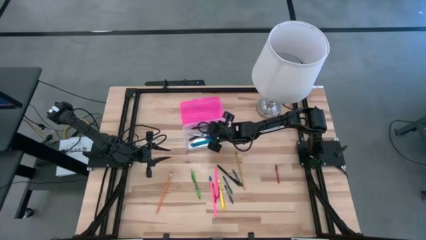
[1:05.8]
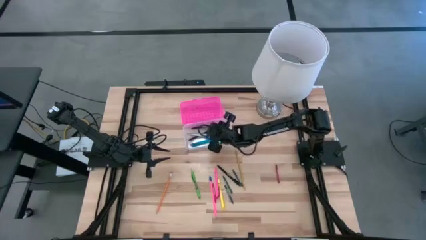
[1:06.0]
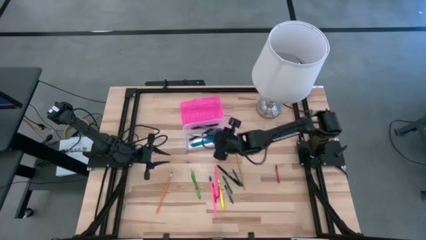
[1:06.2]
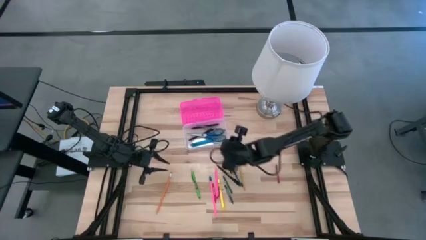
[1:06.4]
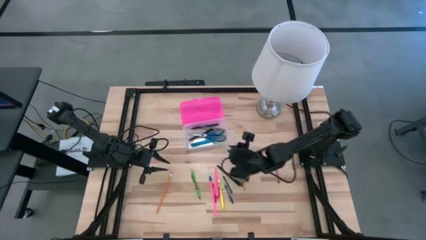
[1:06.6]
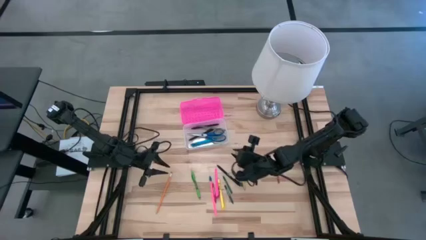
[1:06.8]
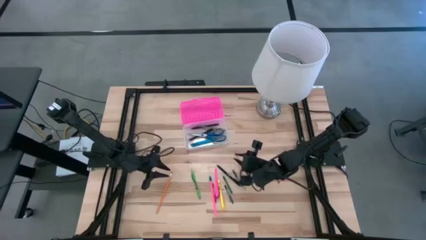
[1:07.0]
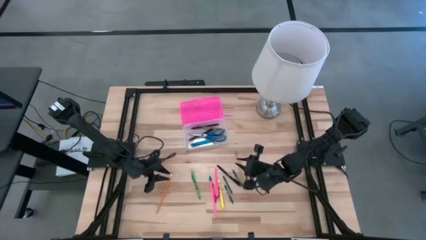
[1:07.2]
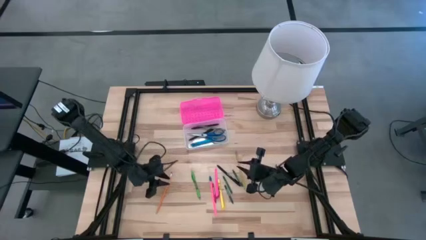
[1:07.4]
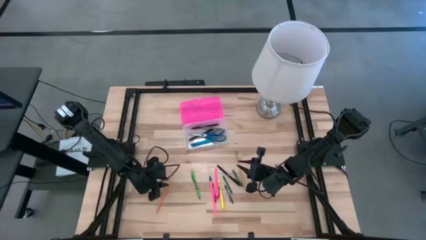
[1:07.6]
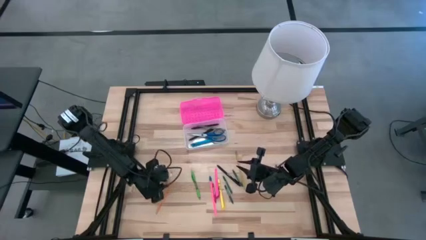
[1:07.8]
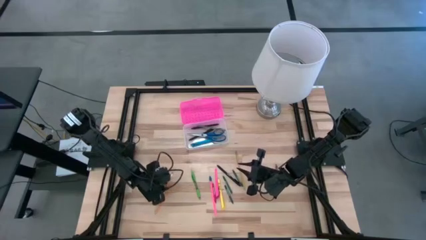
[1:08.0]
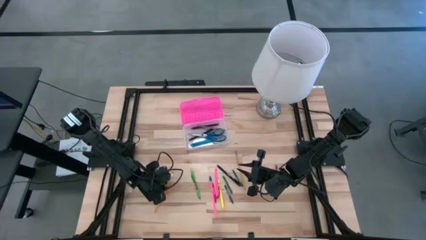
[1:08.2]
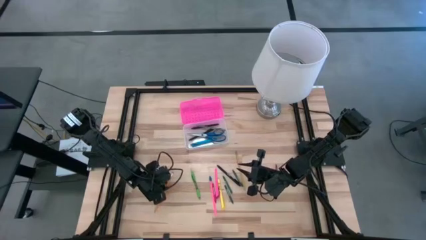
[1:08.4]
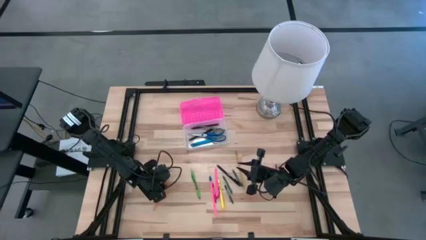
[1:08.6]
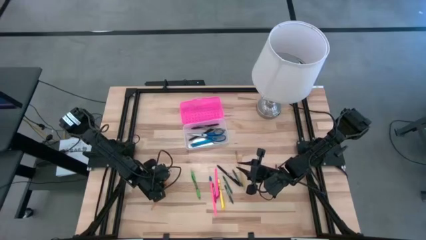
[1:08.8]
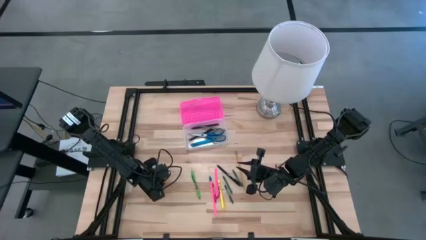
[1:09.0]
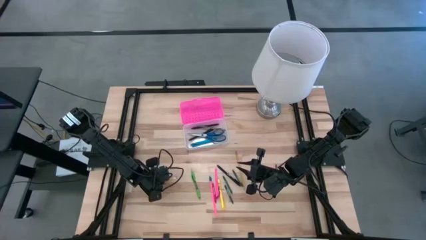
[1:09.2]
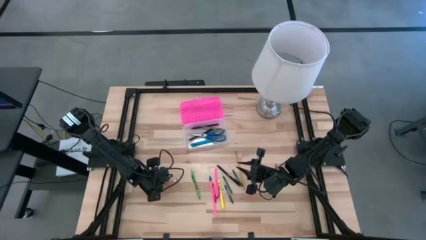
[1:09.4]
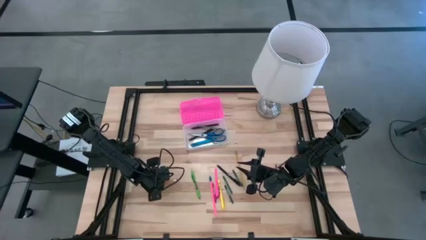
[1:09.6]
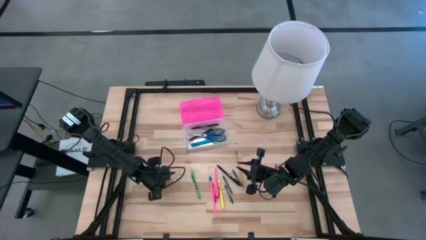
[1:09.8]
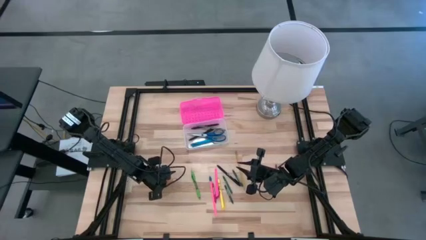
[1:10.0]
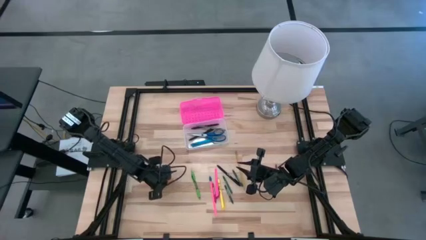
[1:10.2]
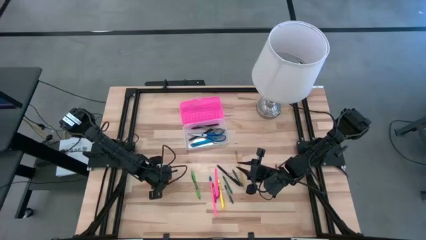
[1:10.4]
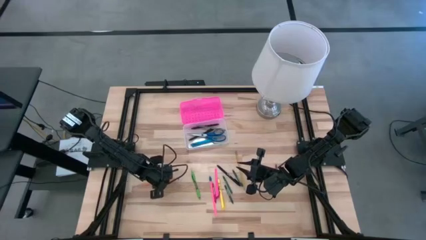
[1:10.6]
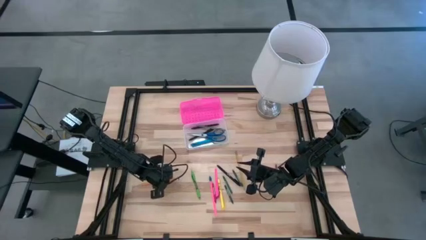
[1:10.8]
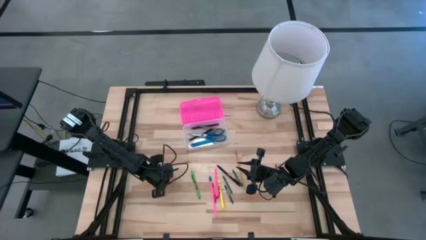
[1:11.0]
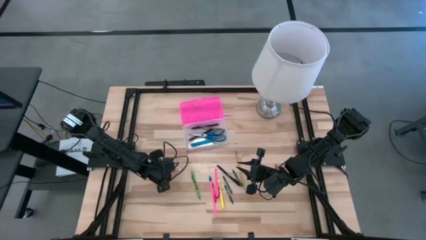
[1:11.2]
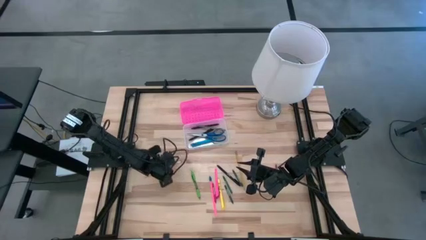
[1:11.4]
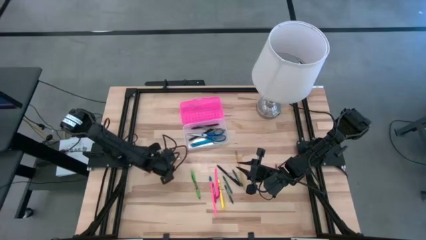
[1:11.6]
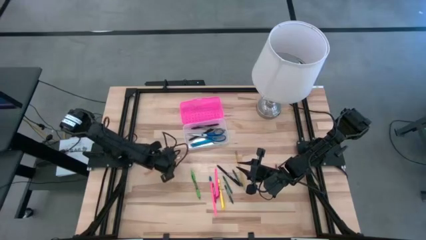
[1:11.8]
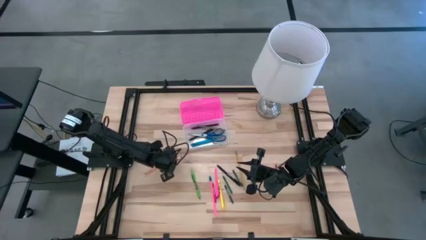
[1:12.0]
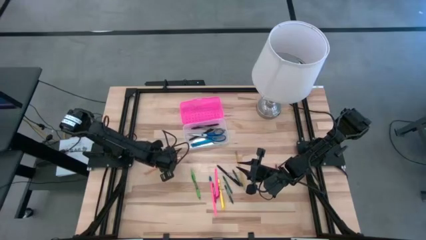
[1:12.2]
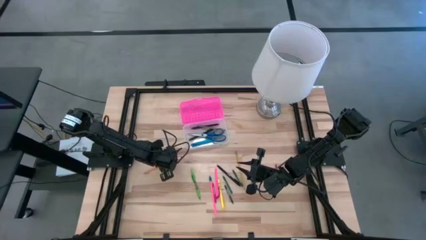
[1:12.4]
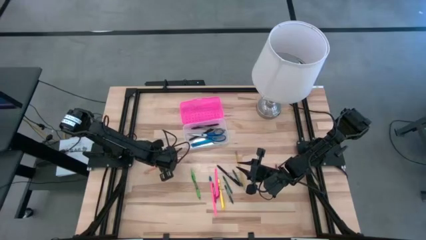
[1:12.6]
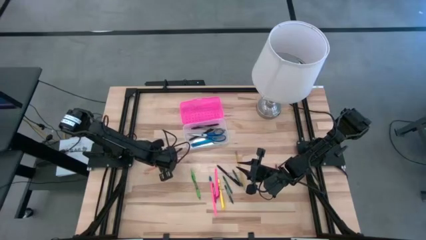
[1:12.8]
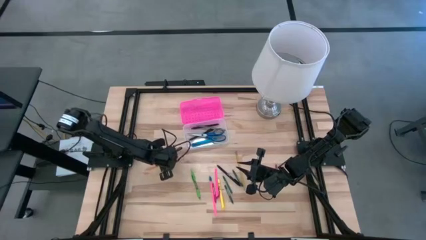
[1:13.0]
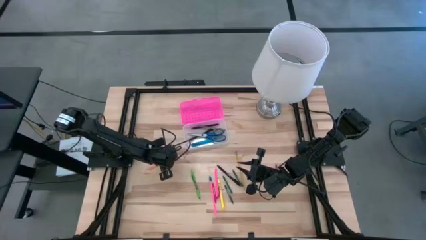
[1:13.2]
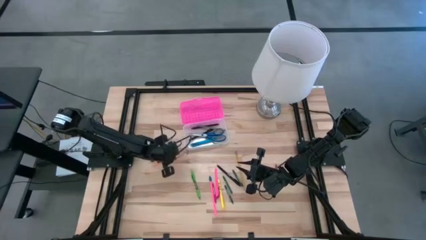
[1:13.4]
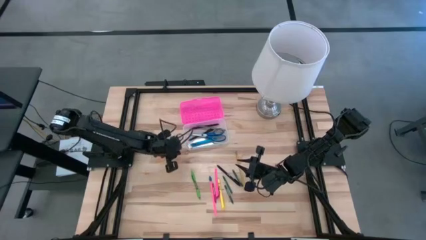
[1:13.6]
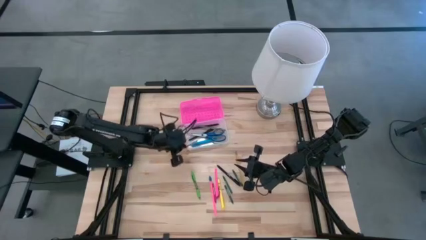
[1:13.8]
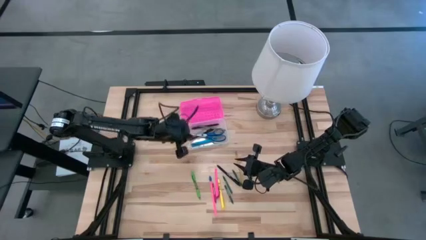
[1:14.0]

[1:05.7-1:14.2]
Task: Pick & place school supplies into a supply box
Put the orange pencil into the pink supply box

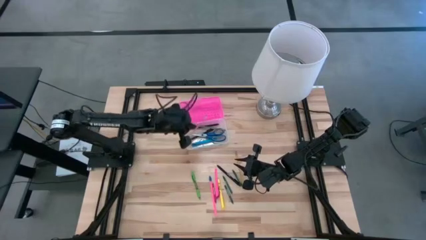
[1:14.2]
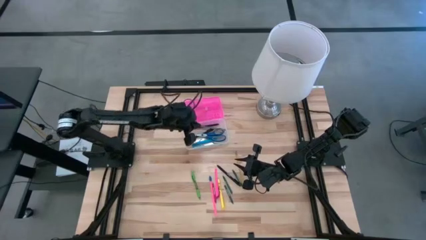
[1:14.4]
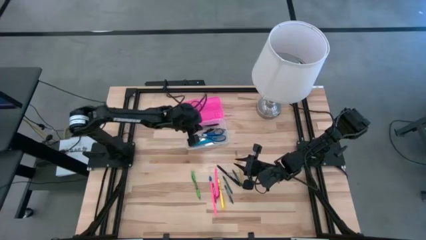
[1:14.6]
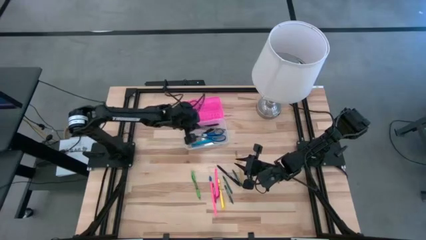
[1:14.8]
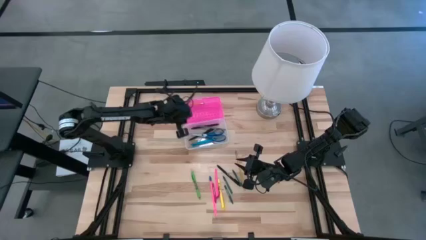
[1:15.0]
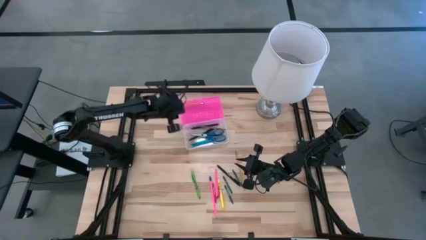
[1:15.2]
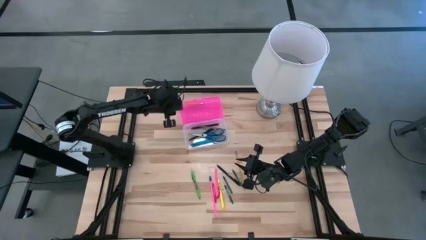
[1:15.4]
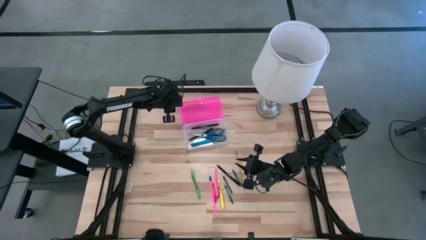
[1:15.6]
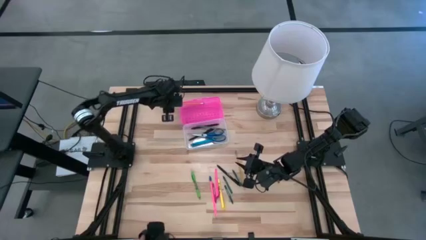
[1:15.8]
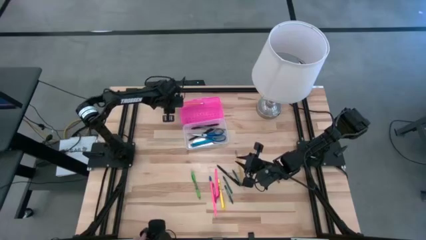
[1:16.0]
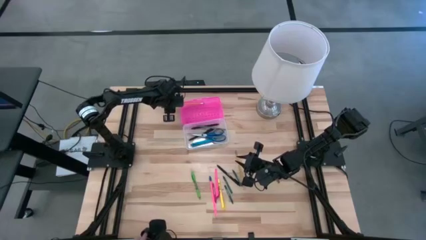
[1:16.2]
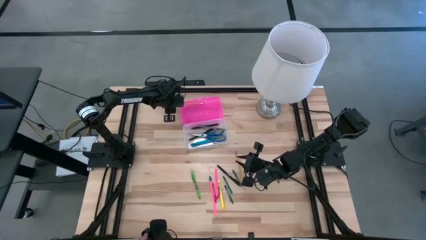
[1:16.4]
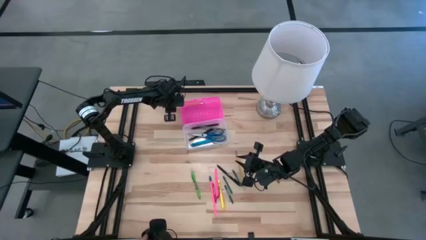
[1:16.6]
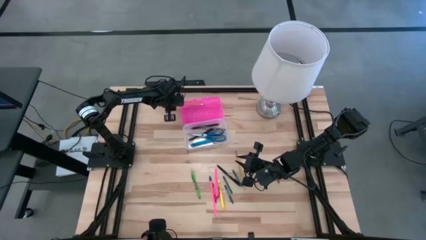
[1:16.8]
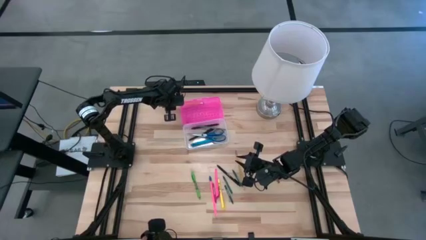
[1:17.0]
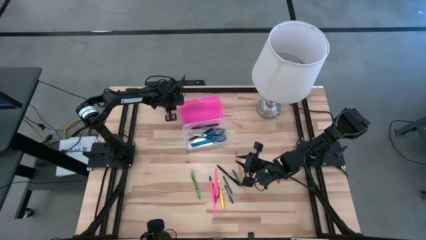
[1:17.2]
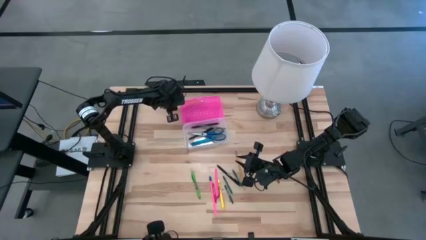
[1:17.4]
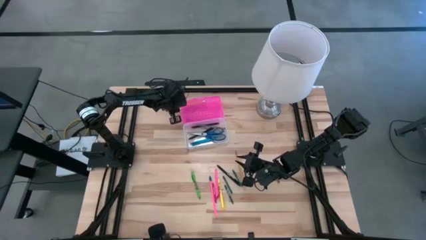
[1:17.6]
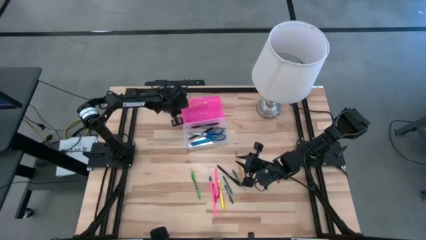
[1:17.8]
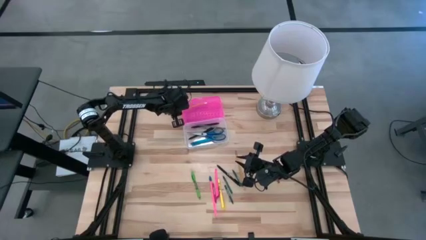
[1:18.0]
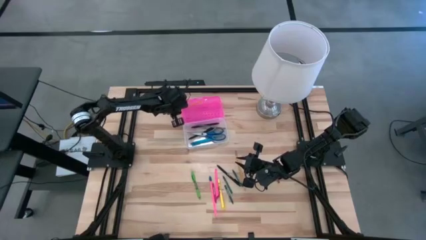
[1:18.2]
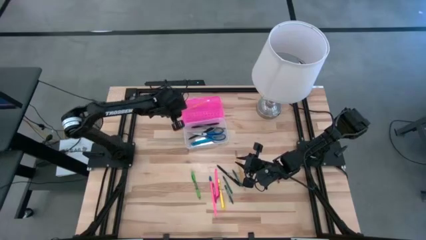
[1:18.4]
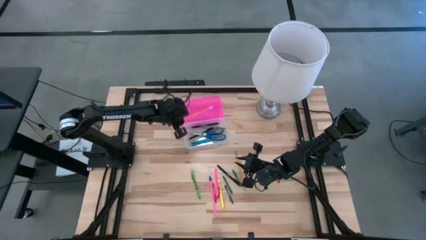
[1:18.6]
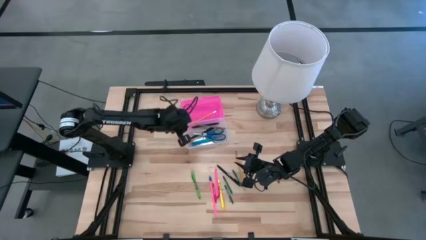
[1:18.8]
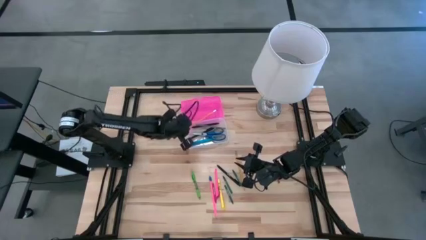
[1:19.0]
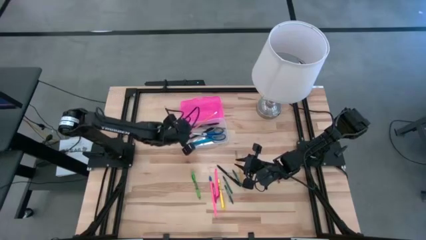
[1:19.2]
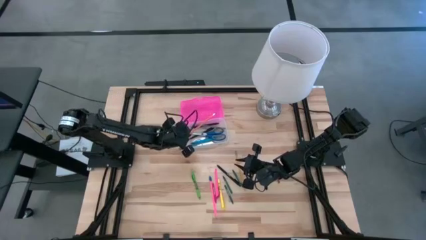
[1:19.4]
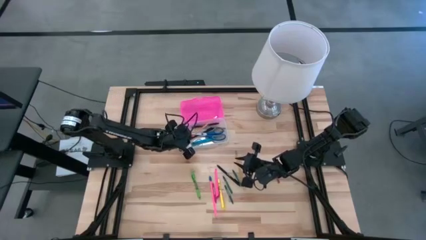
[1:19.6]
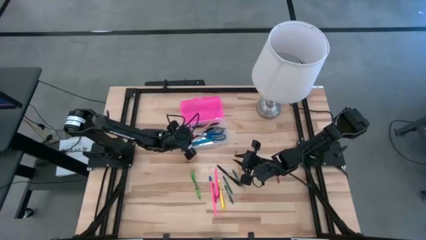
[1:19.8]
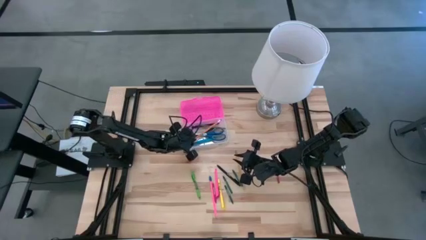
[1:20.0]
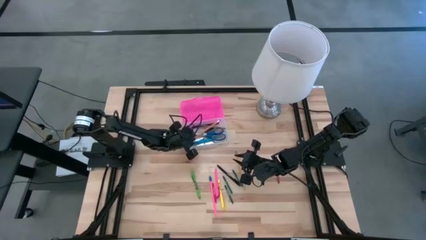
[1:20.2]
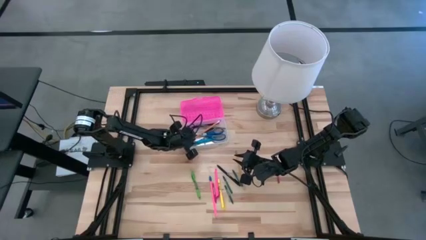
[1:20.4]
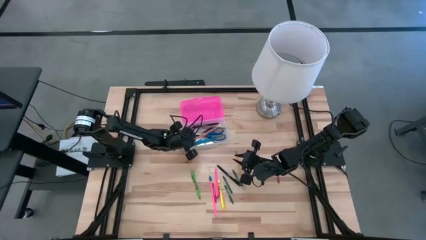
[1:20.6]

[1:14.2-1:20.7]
Put the orange pencil into the pink supply box

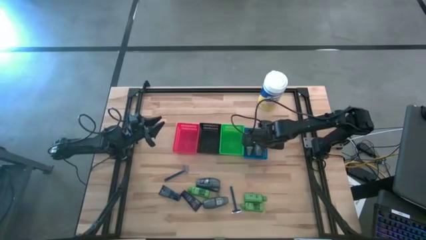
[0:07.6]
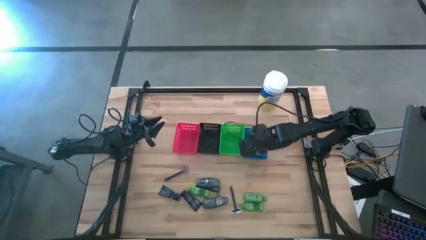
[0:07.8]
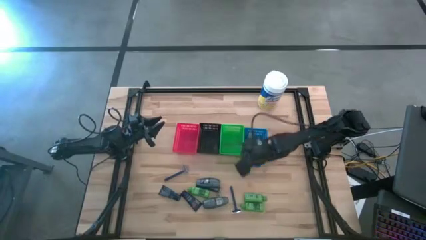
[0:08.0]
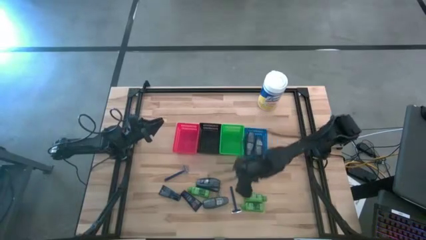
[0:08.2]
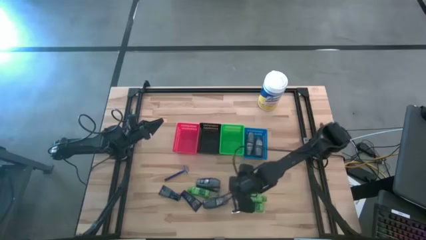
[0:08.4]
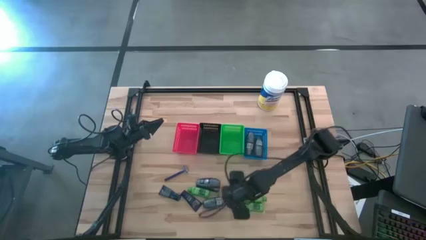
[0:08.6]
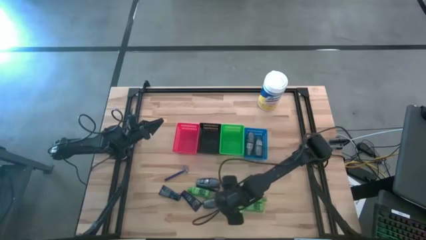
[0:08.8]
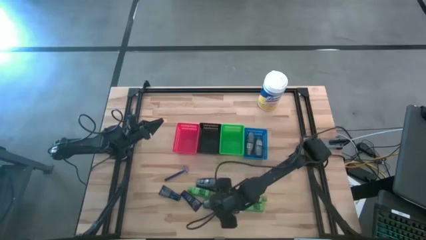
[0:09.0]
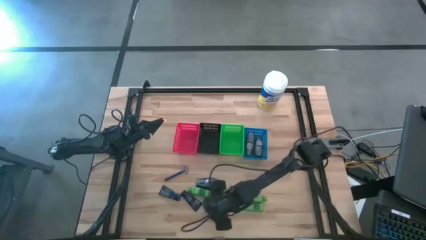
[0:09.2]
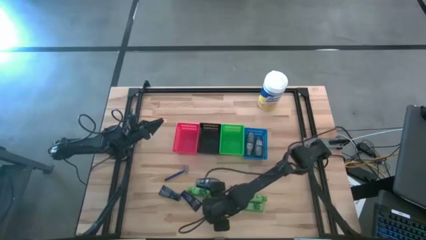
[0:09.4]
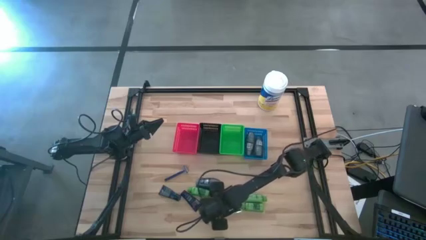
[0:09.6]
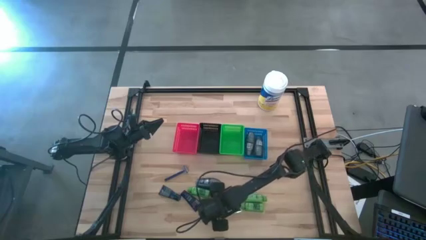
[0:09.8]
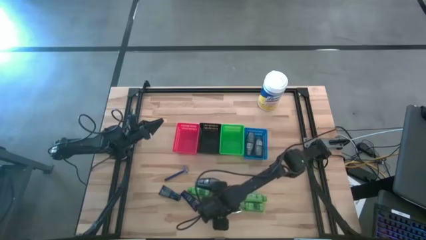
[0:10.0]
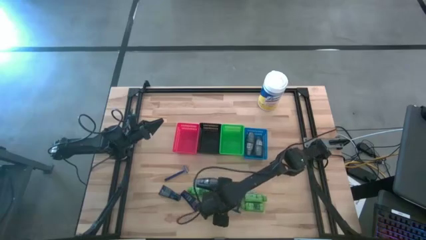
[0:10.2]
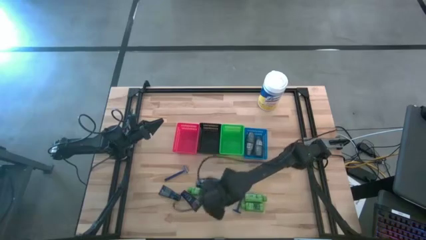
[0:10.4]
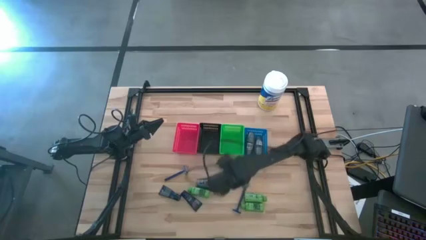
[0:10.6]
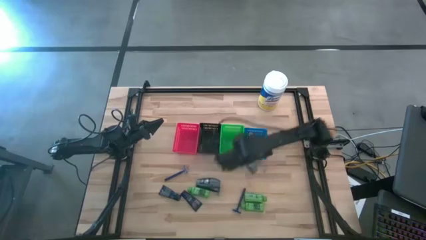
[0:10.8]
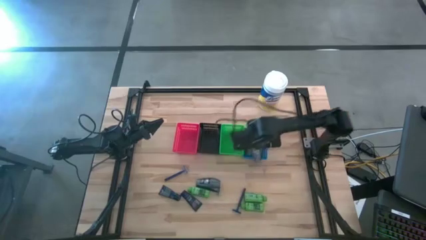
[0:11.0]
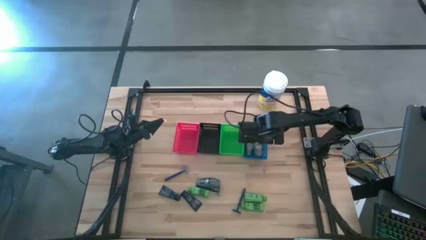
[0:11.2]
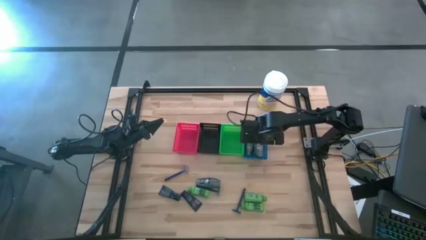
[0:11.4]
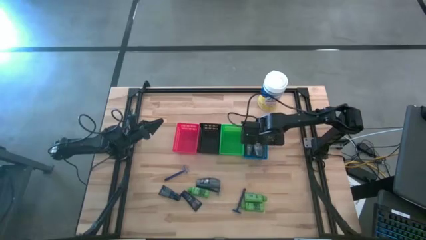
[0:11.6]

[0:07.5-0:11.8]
Task: Pick & Place Travel size toiletries
Put the gray deodorant into the blue bin
